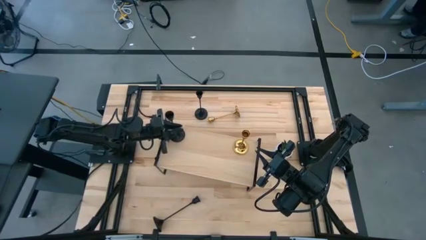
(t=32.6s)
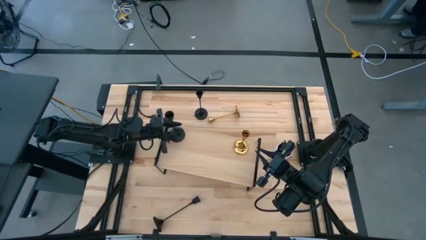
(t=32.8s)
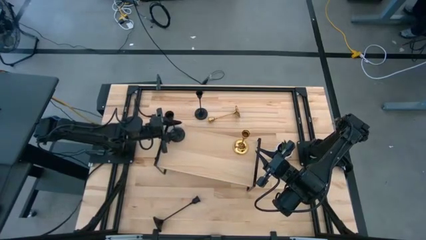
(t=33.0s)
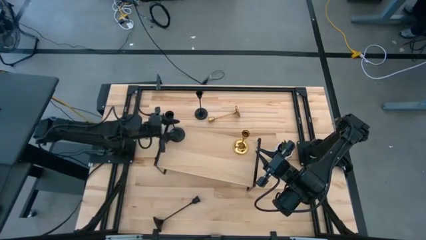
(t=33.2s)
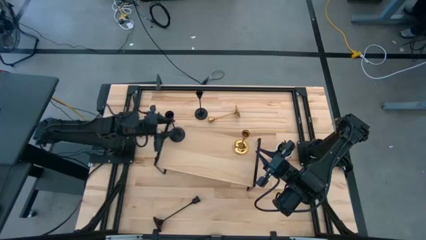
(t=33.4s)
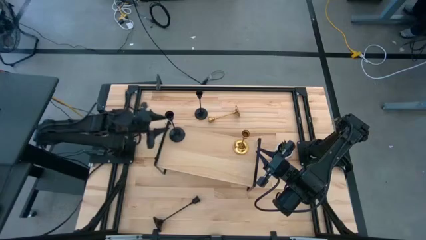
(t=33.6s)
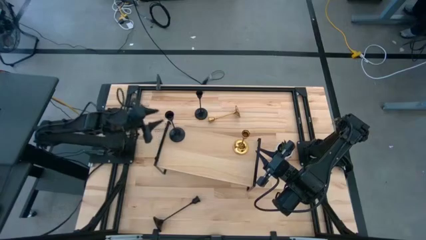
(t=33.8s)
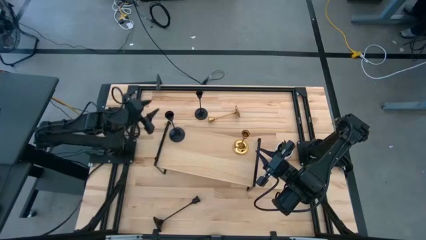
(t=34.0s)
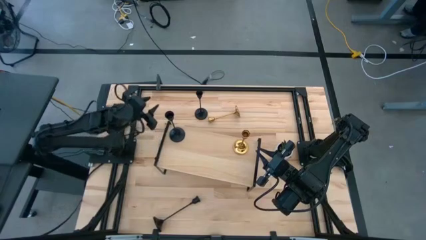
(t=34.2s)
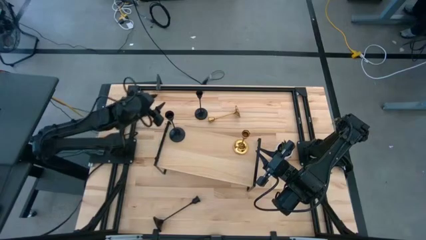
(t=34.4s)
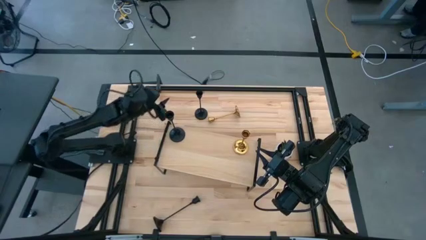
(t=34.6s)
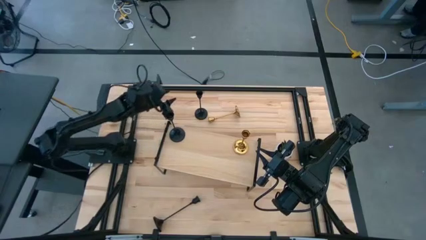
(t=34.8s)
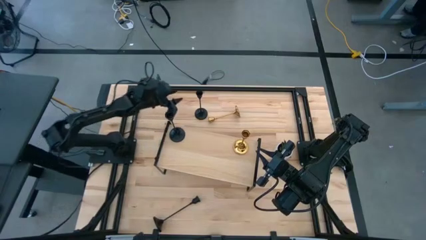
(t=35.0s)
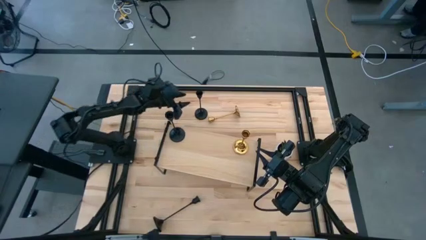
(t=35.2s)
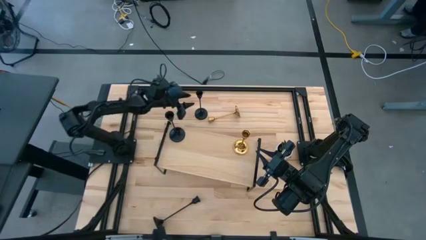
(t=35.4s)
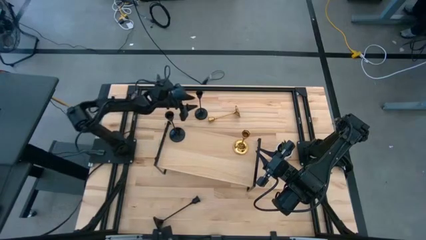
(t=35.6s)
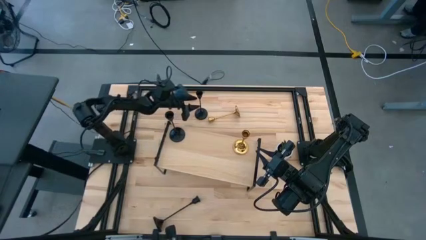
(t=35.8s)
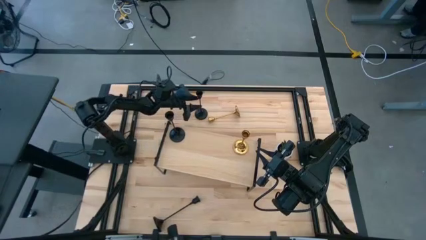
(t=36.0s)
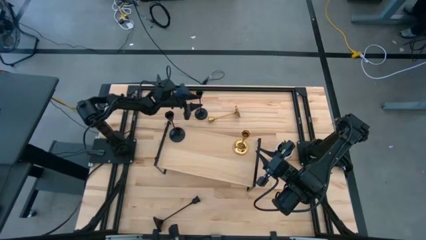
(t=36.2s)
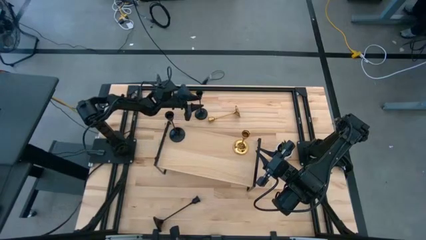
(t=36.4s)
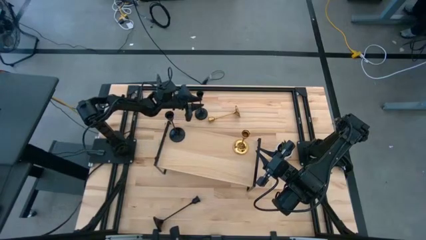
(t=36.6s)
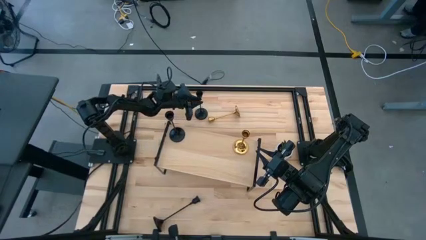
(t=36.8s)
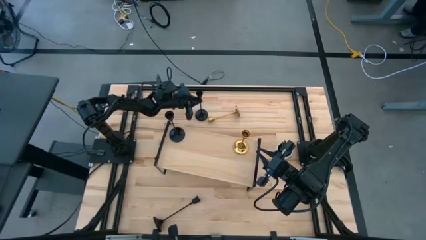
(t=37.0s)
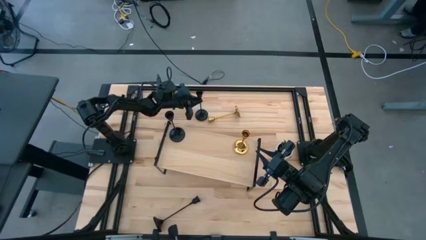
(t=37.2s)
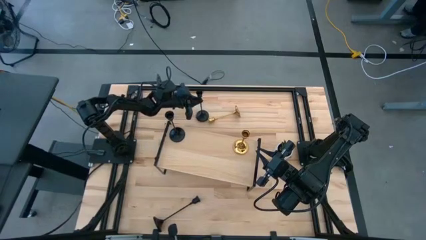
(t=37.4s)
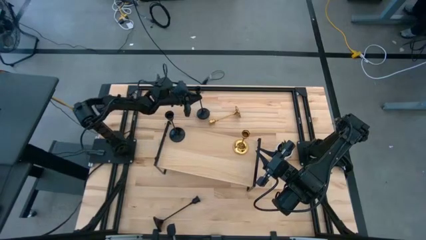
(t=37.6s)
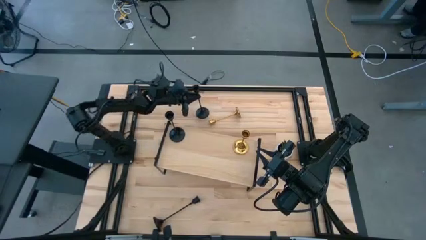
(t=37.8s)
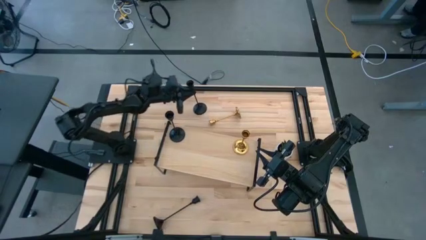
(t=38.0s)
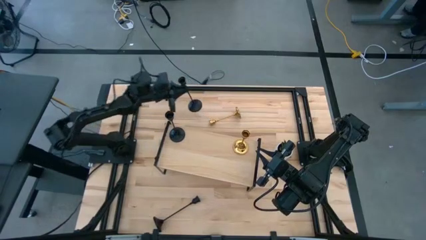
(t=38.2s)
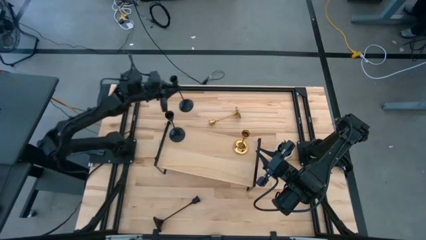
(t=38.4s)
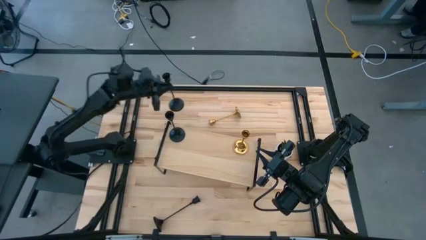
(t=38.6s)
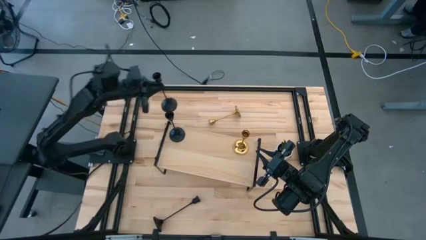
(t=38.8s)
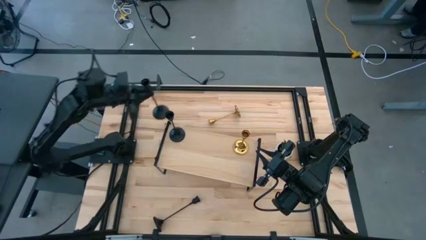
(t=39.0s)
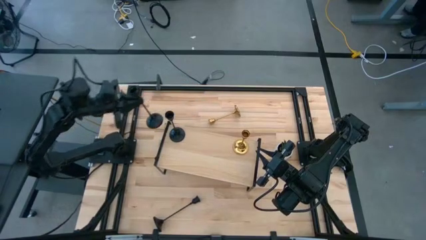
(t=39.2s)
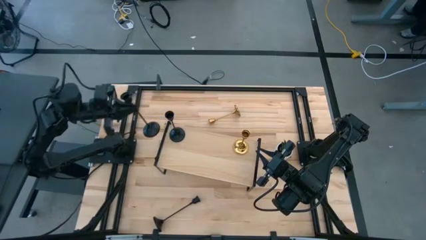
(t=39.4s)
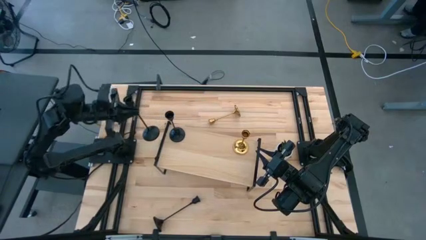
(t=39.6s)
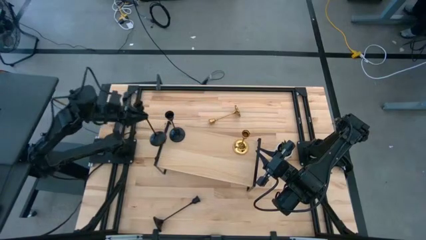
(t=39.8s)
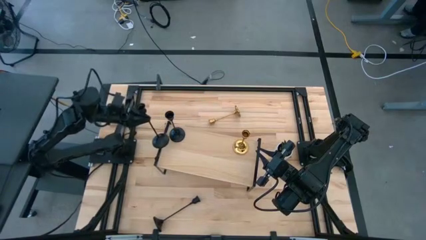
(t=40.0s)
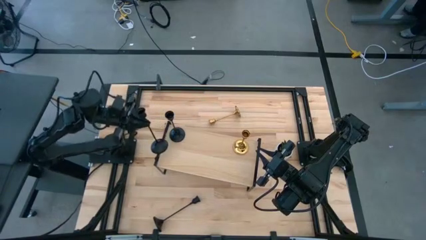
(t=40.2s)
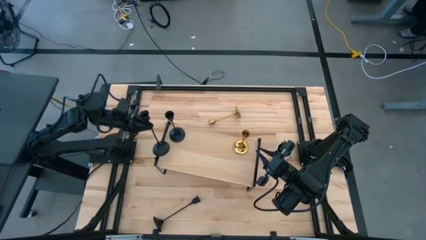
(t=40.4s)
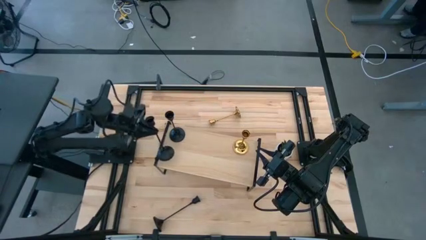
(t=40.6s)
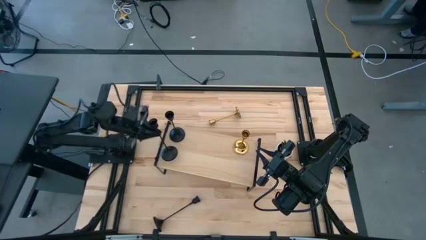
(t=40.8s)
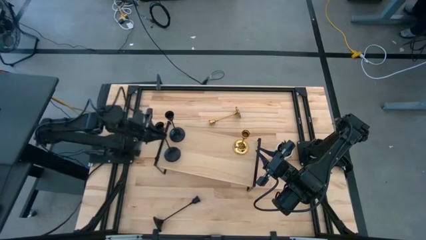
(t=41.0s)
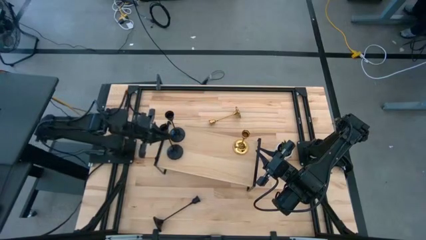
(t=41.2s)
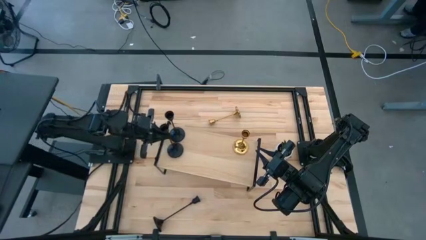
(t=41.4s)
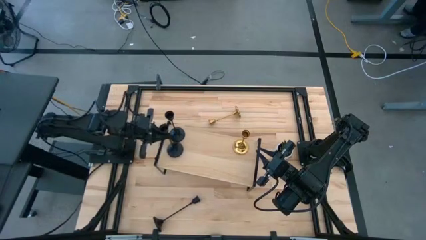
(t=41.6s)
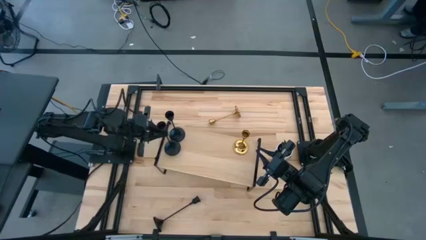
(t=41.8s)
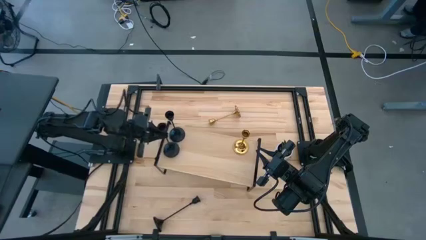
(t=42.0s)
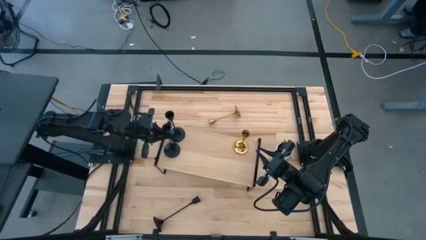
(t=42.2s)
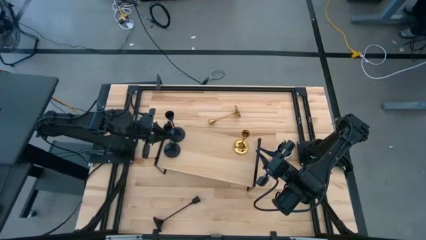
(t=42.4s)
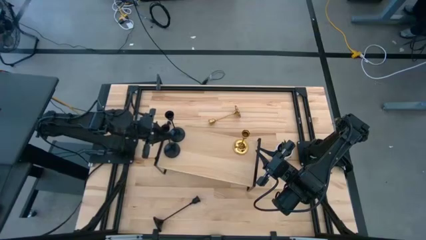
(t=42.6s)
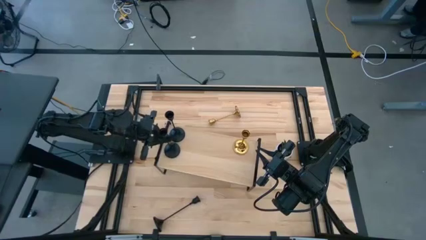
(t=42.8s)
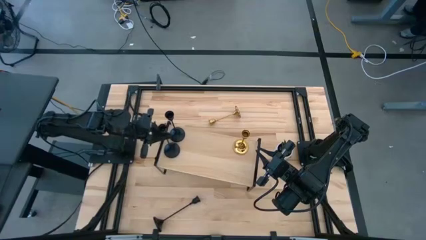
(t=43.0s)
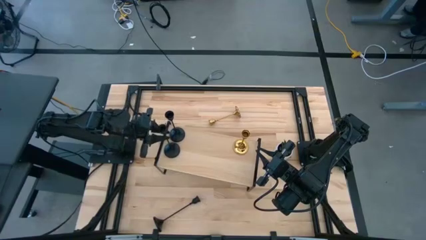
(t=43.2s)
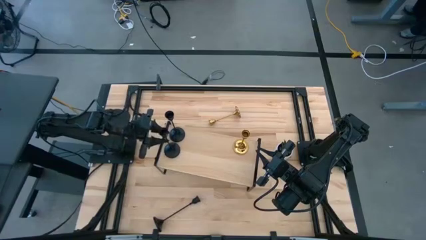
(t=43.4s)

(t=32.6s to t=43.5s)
Task: Pick & Place candle stick holders
Put the top black candle holder on the shelf aligned with the other black candle holder

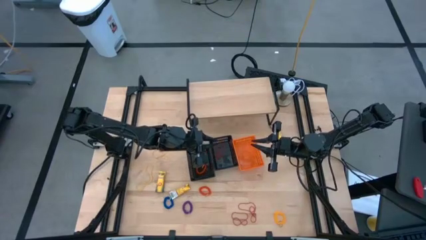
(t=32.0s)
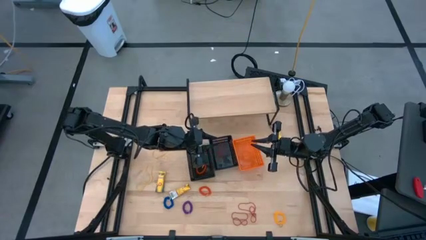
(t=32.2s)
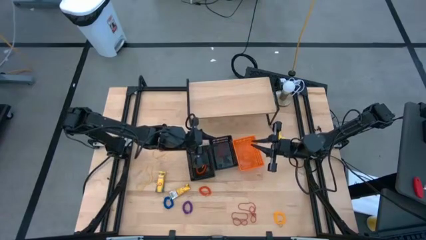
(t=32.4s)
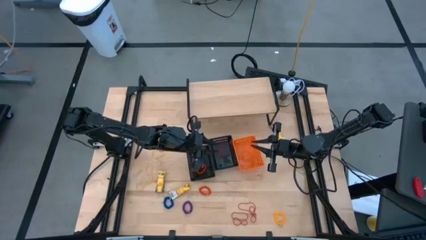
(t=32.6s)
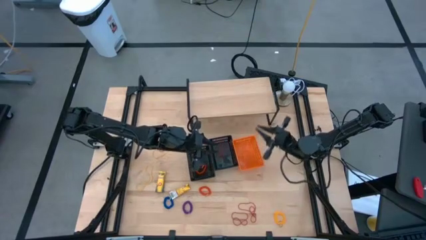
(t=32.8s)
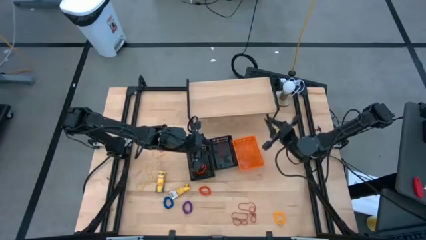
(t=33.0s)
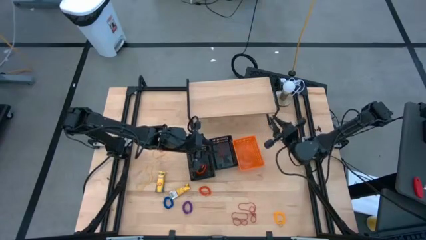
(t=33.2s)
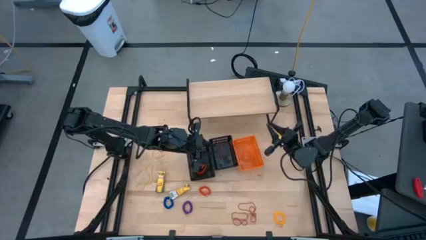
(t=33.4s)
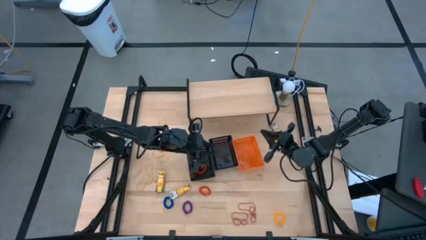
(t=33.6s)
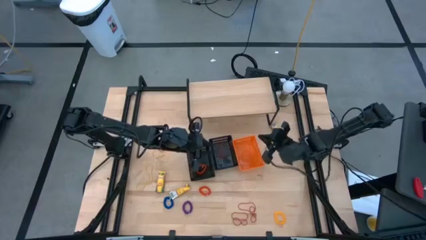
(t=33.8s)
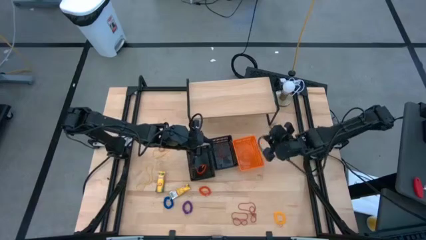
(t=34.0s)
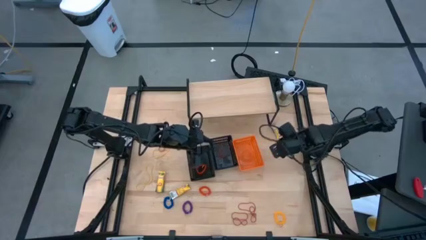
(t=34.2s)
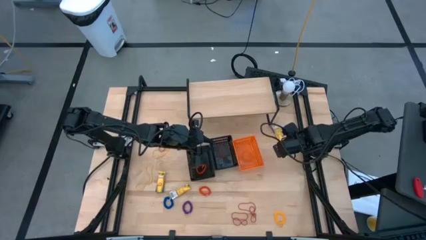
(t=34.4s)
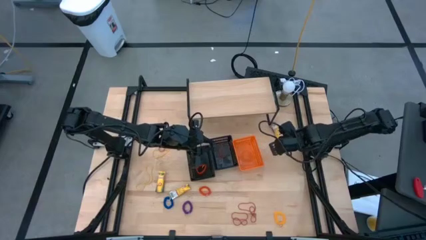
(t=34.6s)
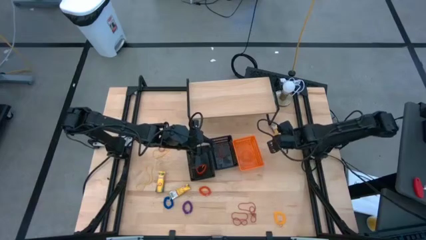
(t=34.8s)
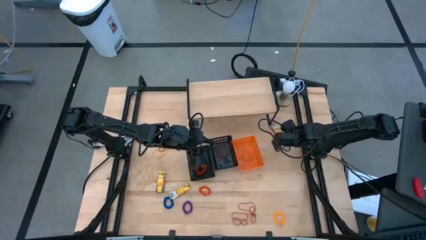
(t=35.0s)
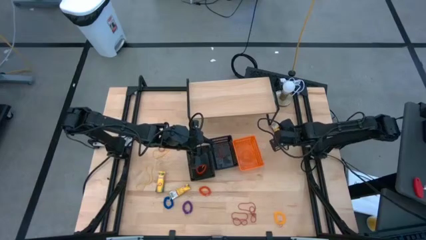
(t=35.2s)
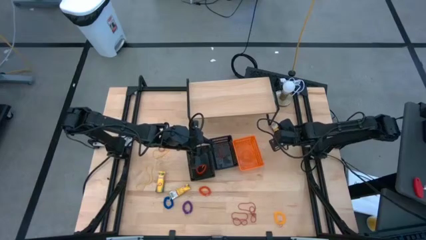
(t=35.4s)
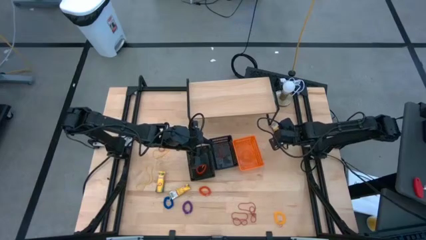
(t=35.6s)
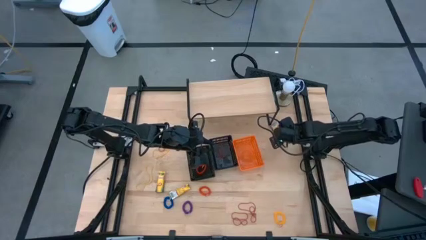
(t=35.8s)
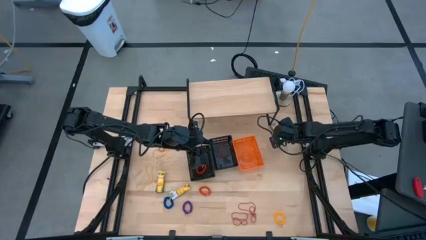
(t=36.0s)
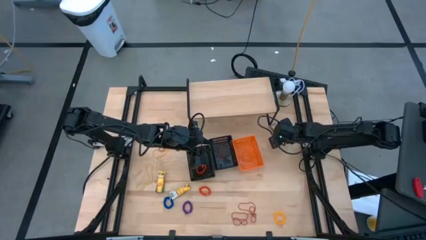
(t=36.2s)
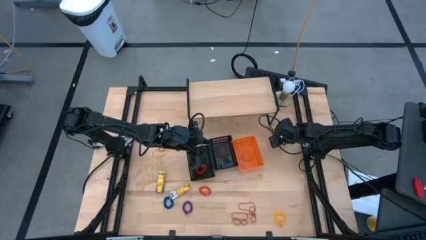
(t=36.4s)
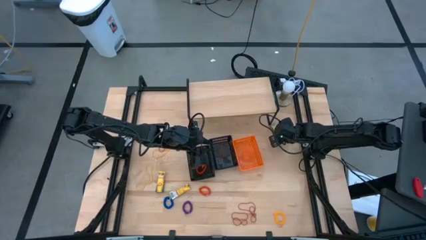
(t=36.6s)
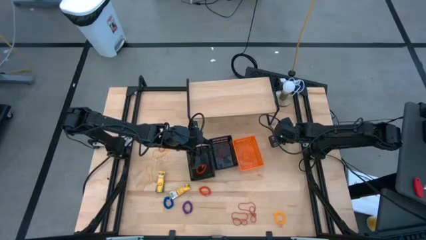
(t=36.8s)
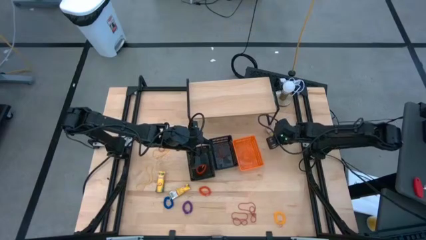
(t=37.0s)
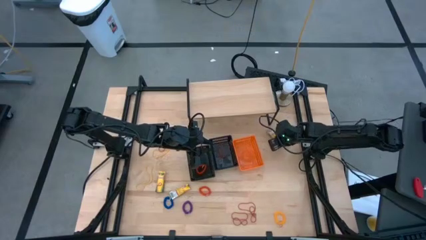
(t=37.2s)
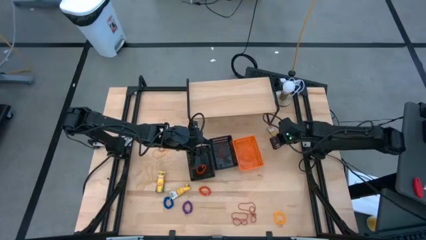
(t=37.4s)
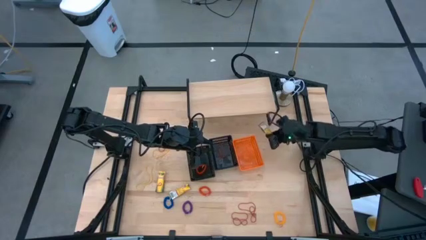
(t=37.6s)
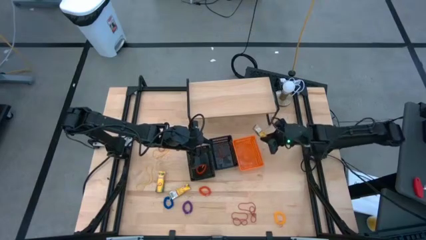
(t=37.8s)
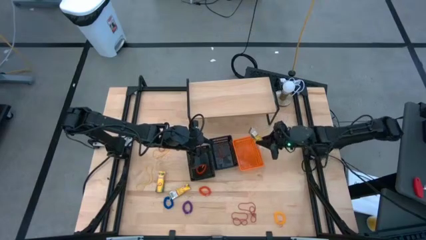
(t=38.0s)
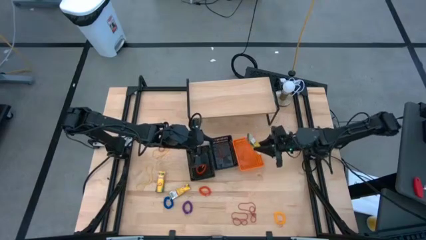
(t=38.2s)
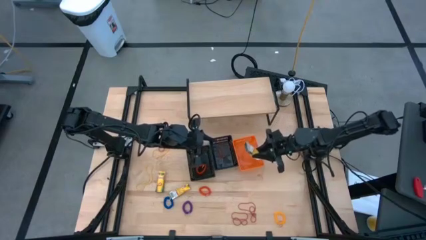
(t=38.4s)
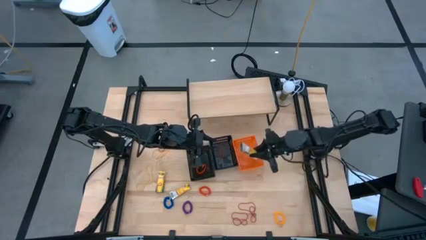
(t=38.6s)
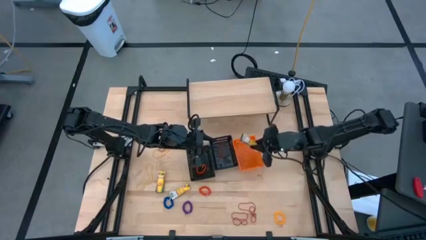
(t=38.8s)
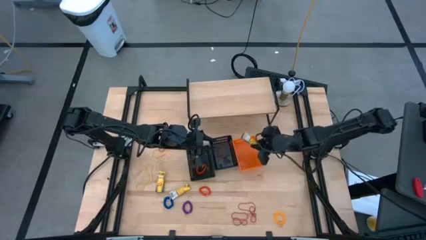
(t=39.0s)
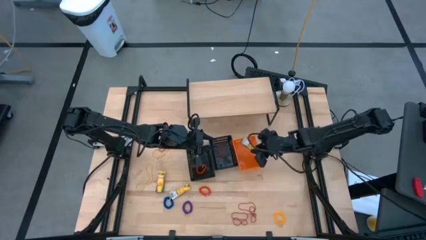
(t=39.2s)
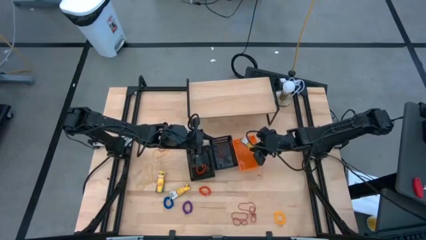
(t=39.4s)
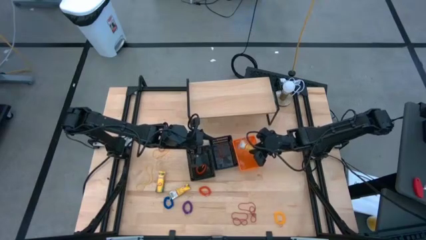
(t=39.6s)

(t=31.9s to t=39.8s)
Task: Pick & Place Office Desk Supplies
Put the yellow crayon bag into the orange bin
